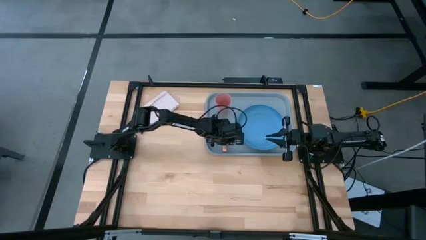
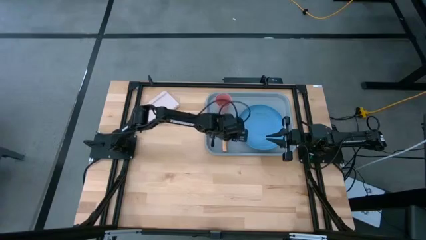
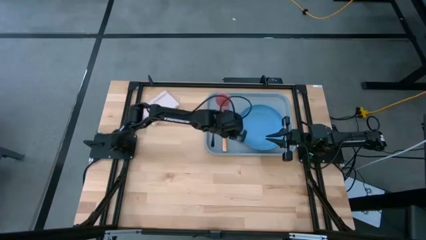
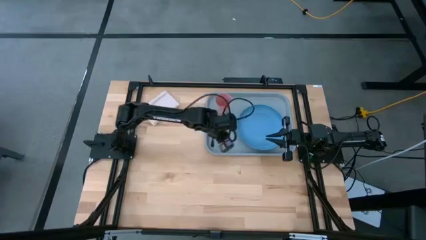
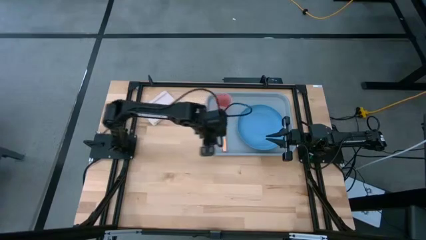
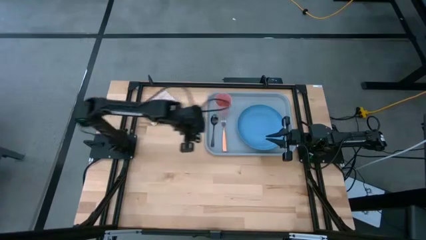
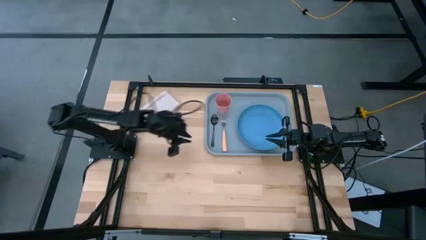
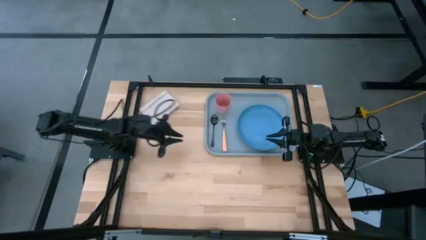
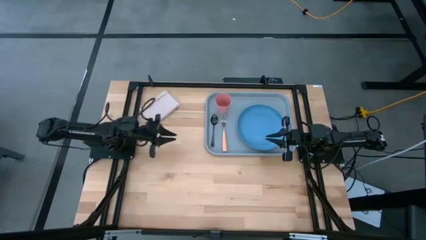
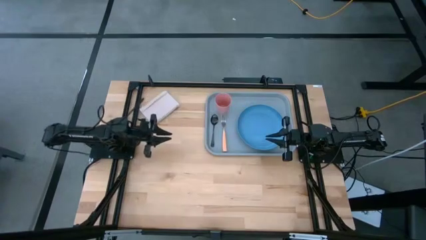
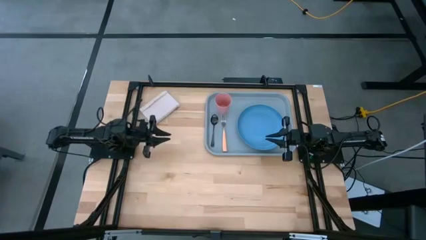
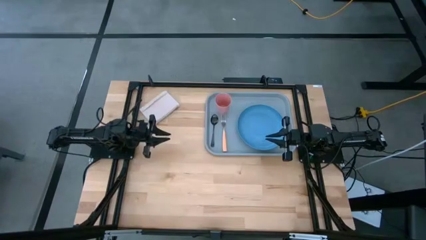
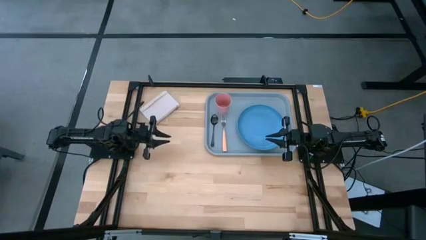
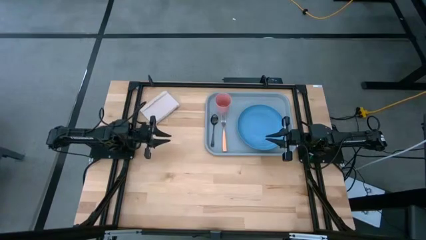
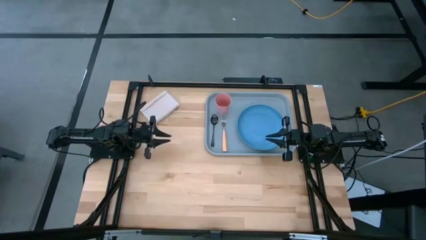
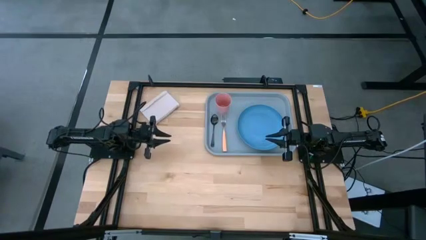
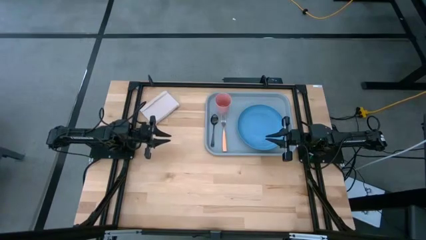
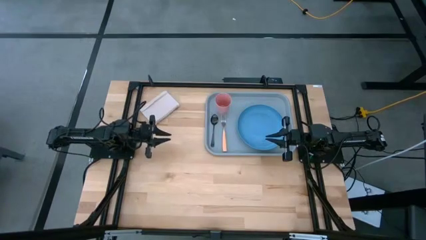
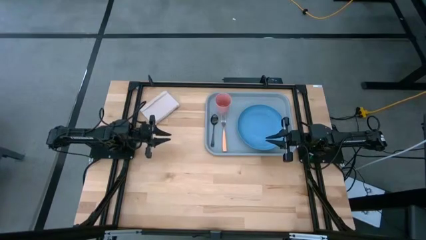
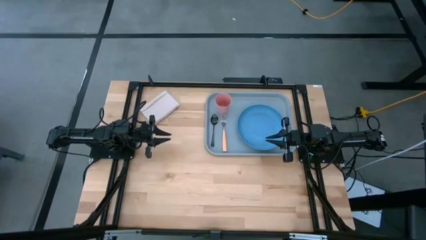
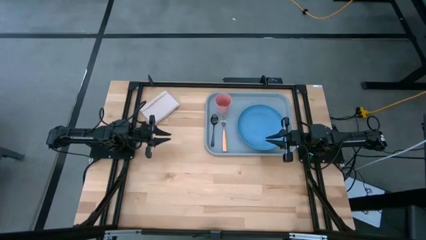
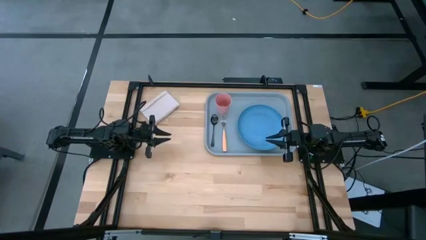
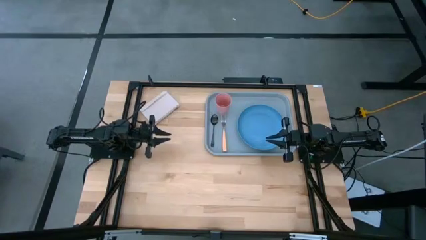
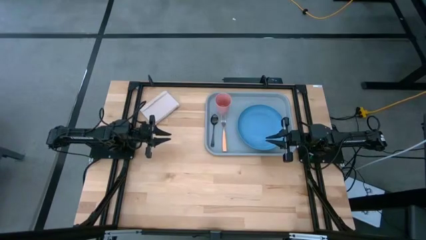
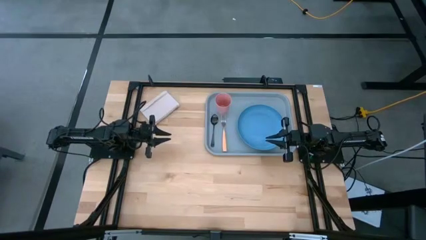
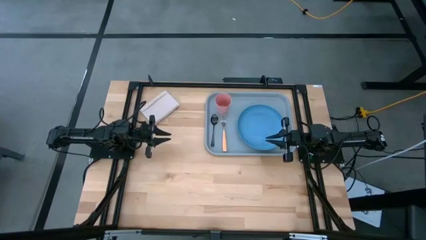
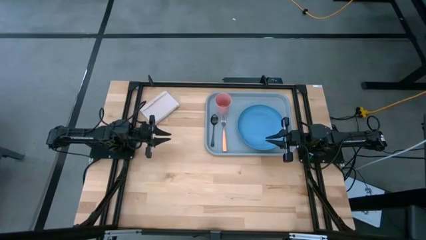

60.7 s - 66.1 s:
Task: Pick and place plate/cup/fork/spoon on tray
Return to Home Position

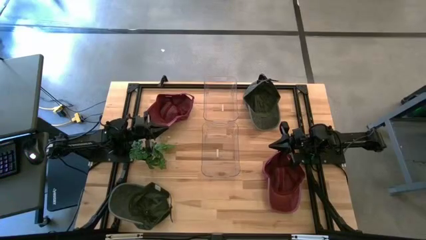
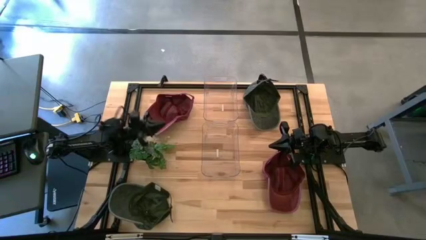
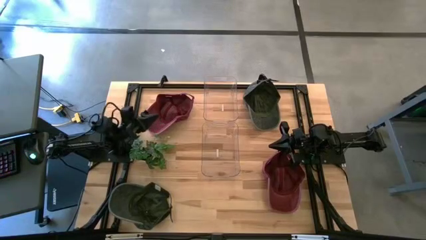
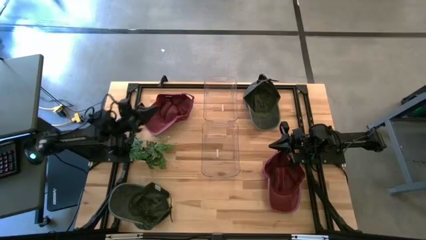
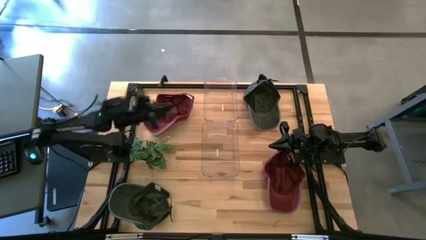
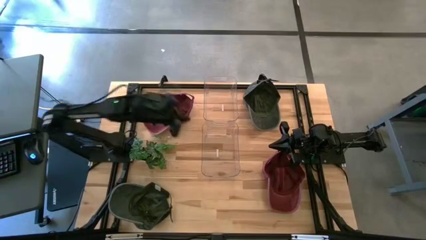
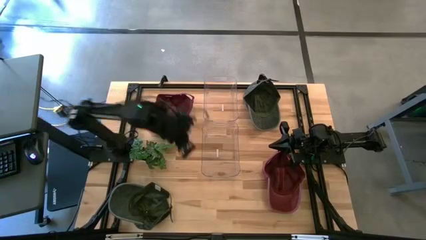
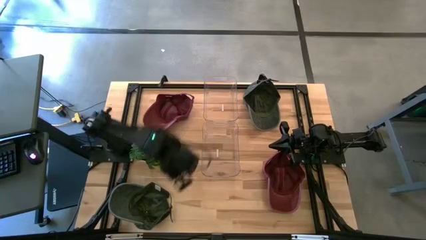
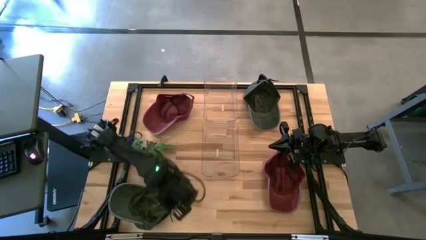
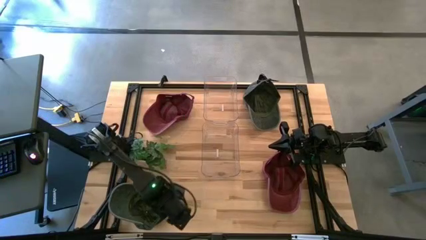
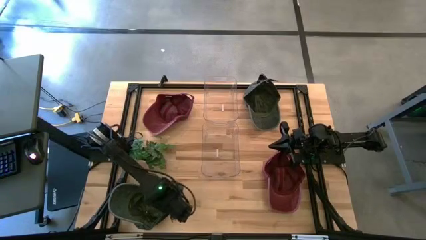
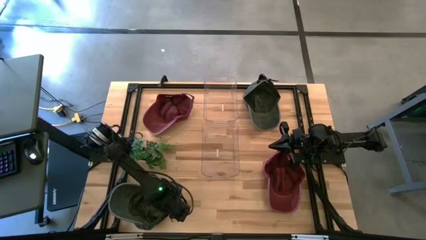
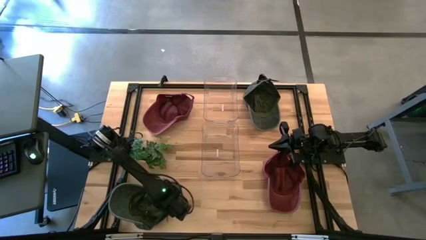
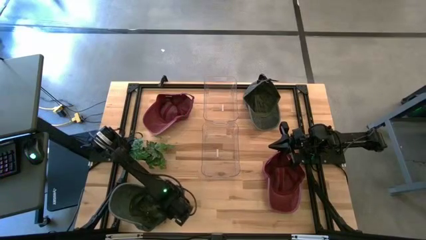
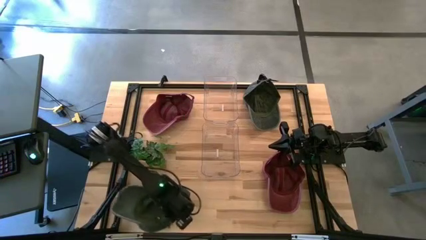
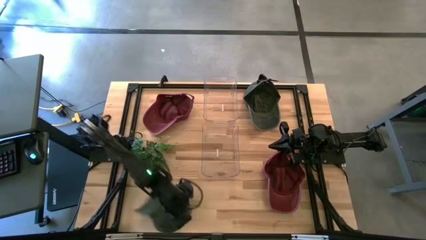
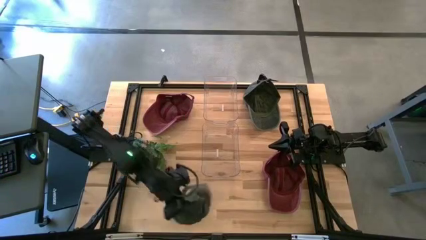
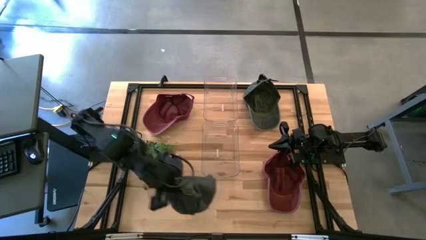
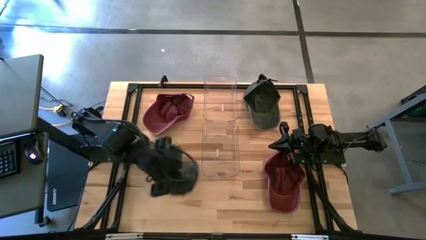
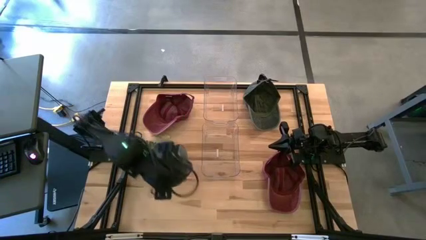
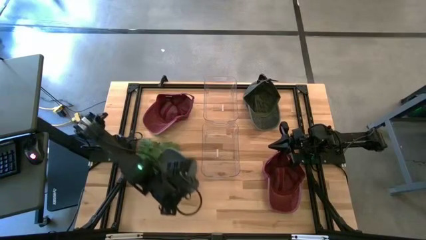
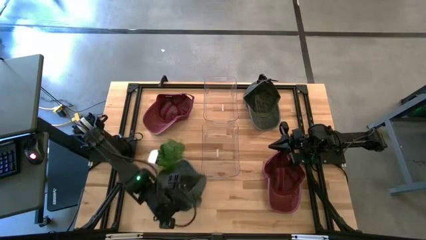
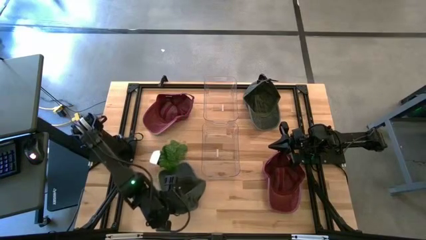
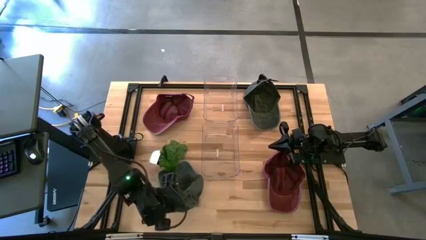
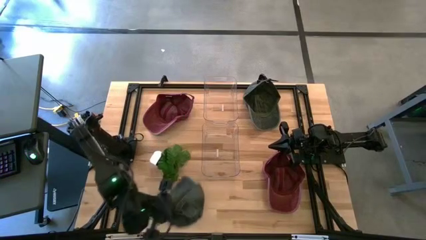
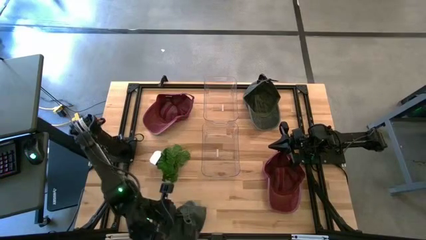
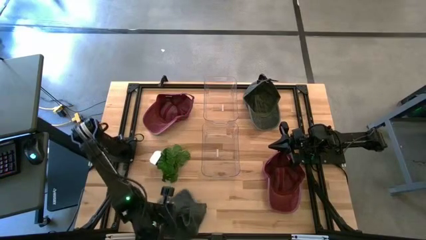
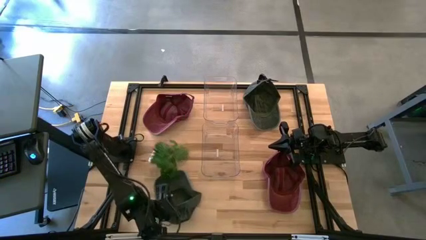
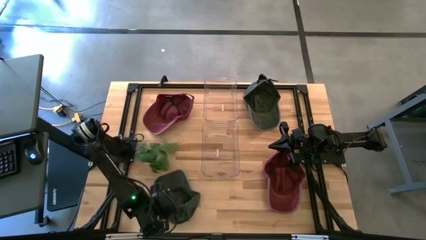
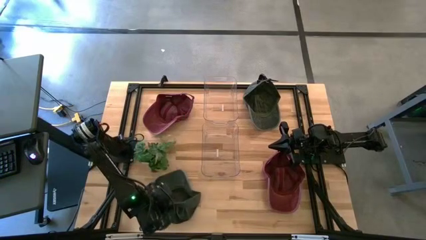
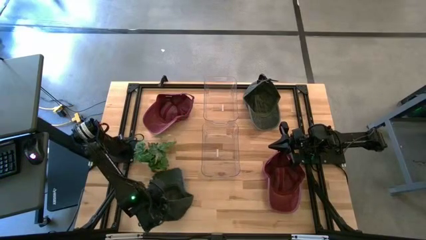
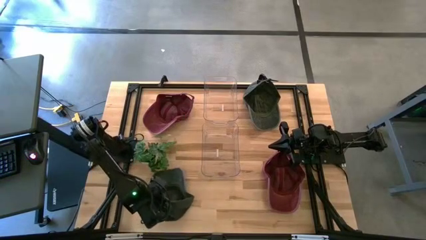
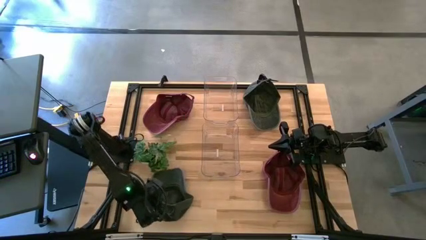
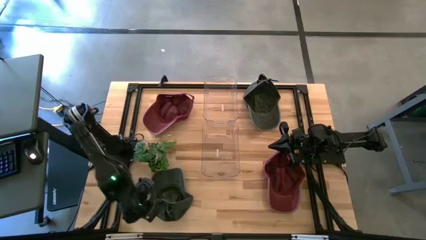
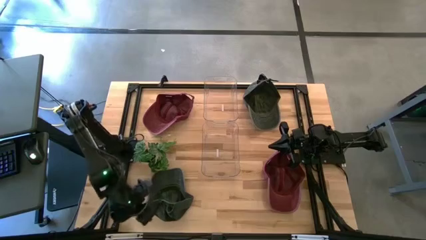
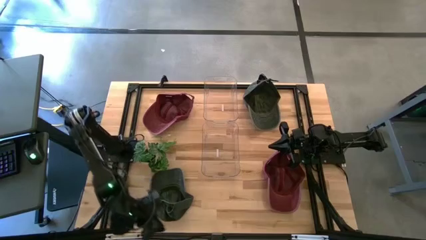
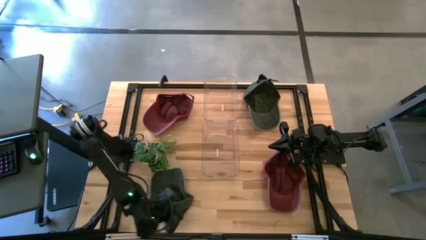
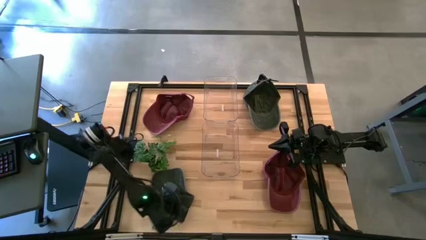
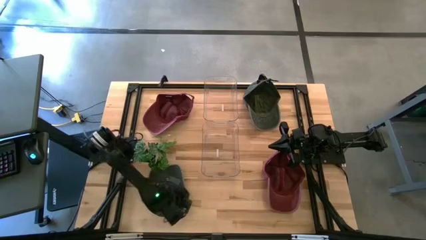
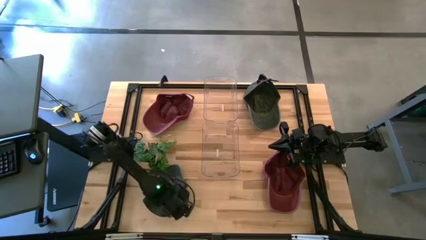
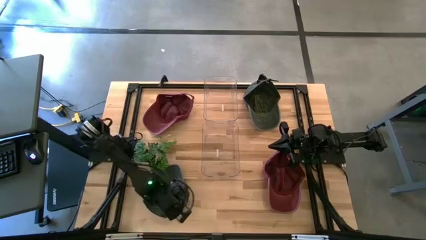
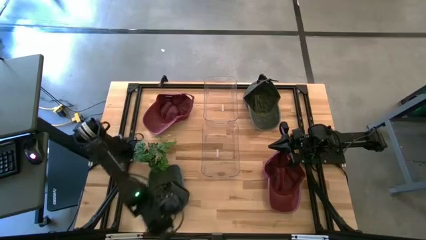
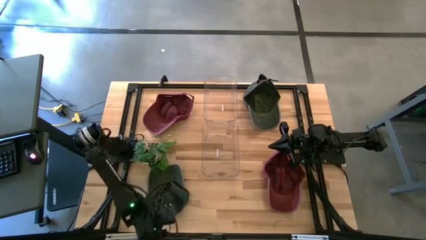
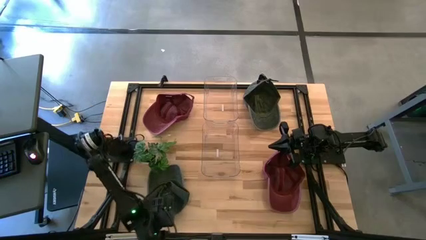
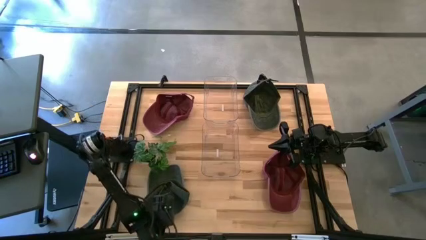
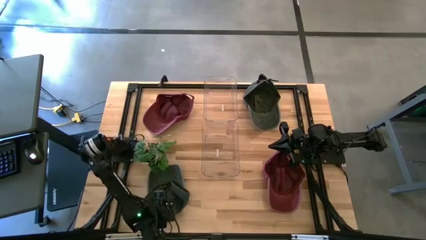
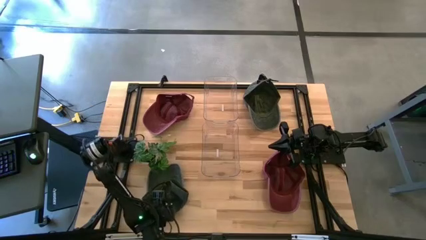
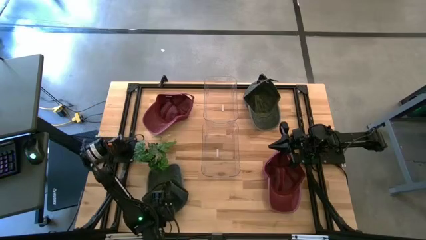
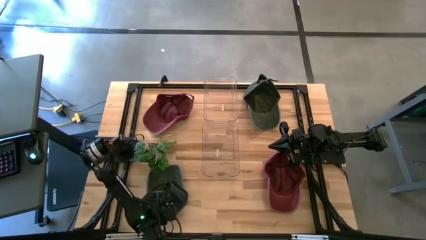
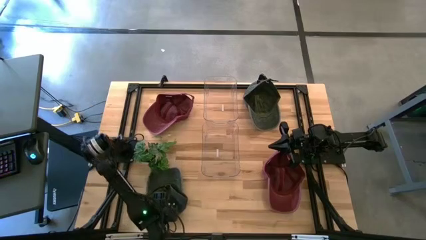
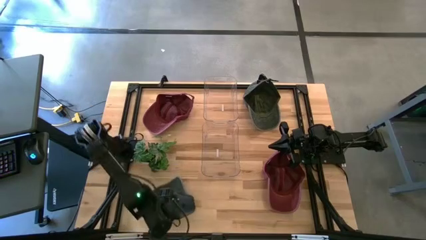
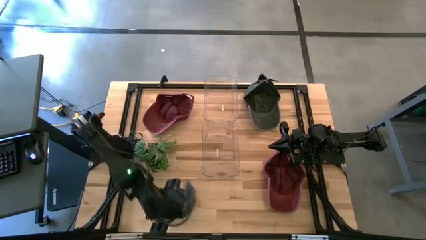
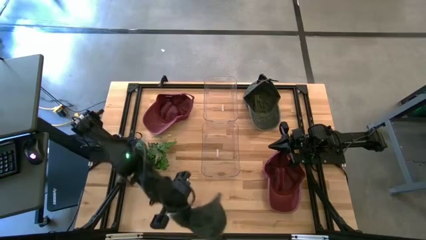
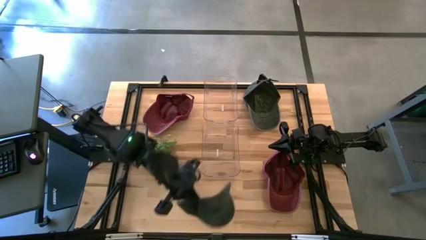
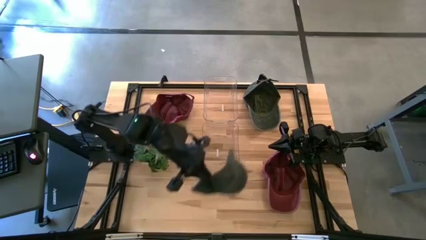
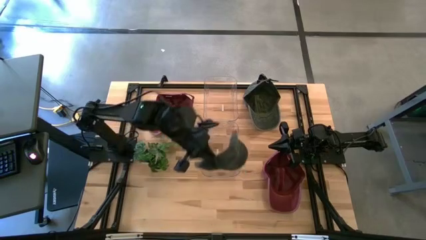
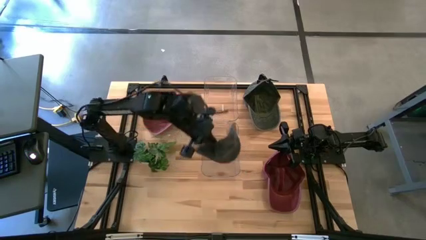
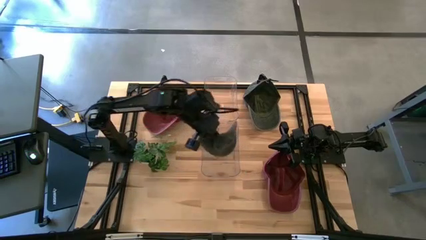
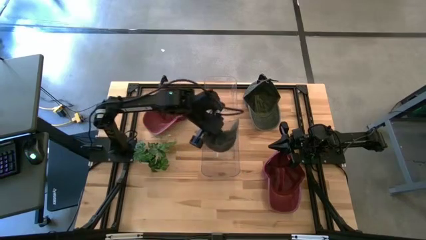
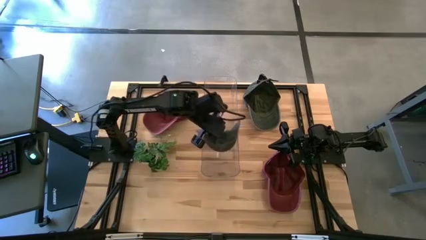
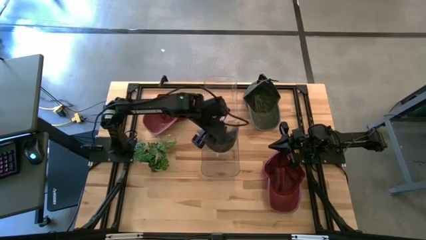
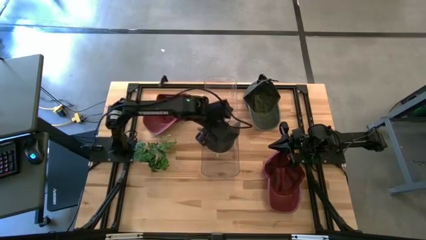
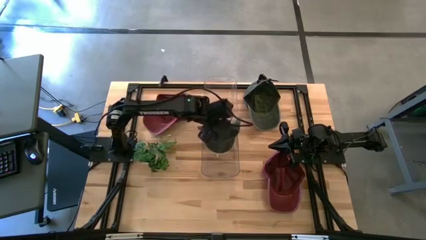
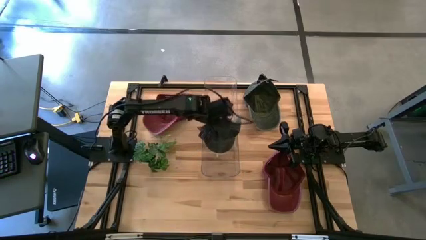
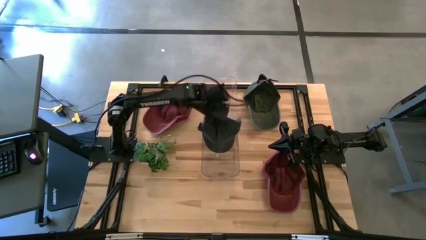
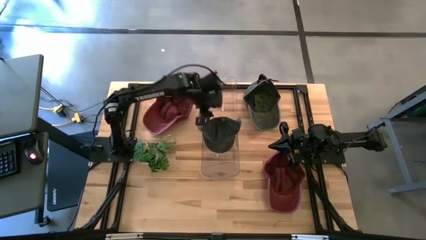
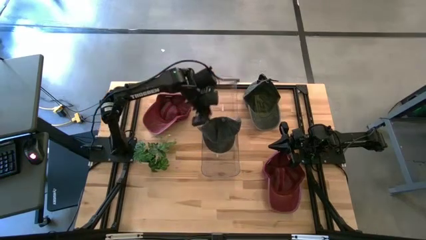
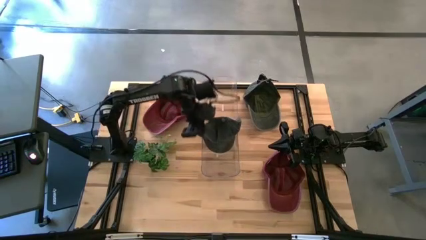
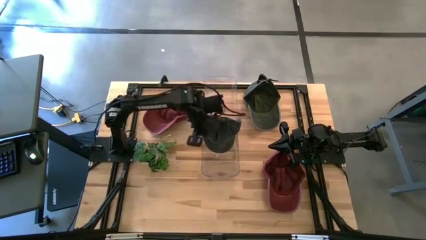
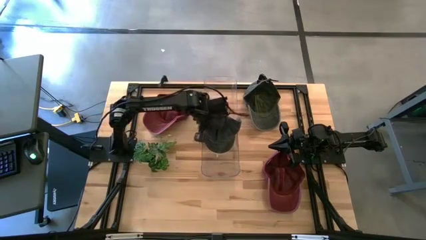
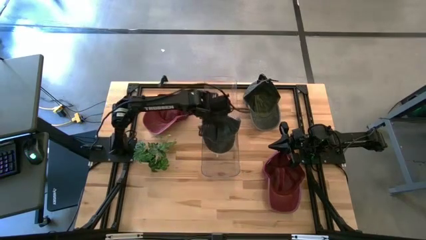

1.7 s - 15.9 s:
Task: Pick & Place hat
Put the bottom black cap into the bottom transparent bin
